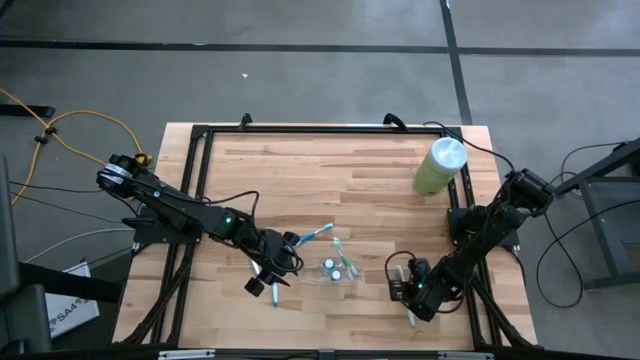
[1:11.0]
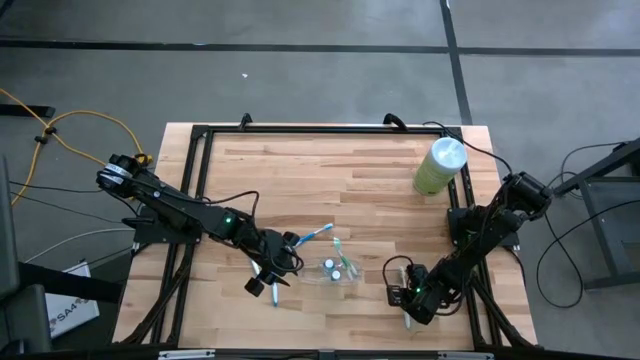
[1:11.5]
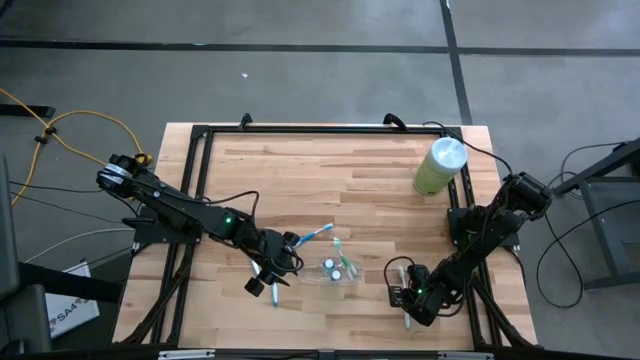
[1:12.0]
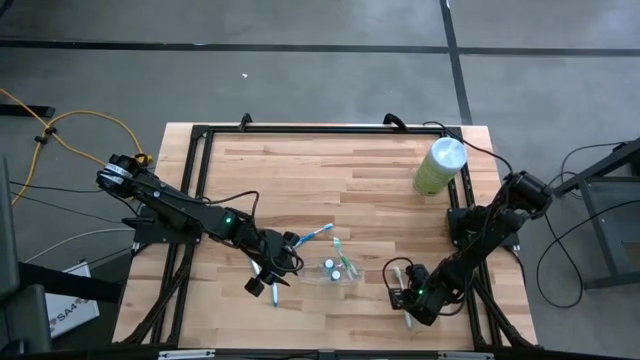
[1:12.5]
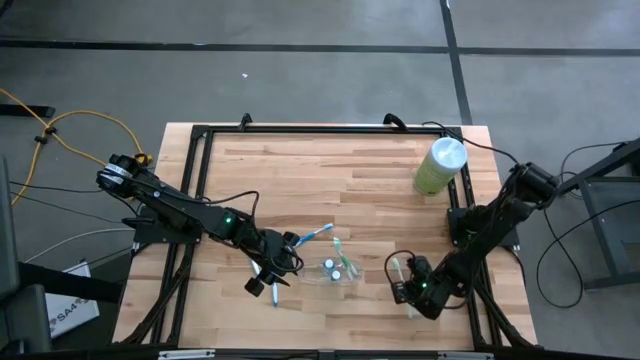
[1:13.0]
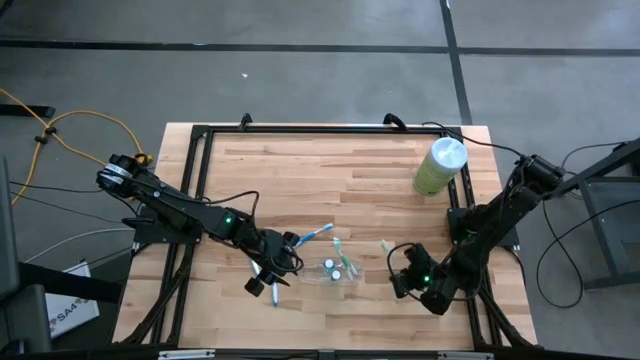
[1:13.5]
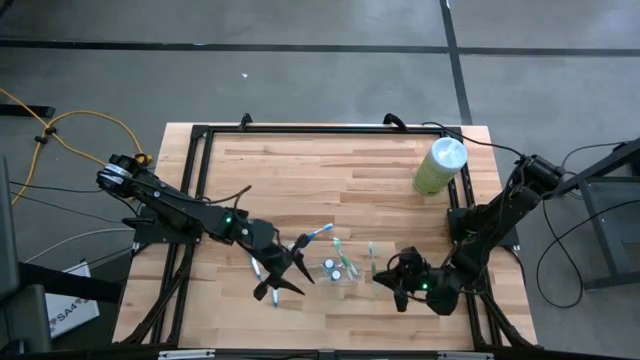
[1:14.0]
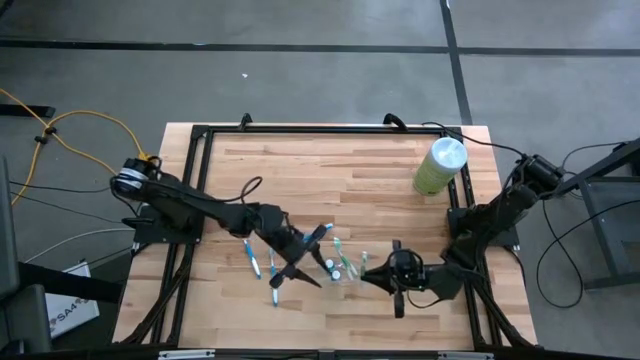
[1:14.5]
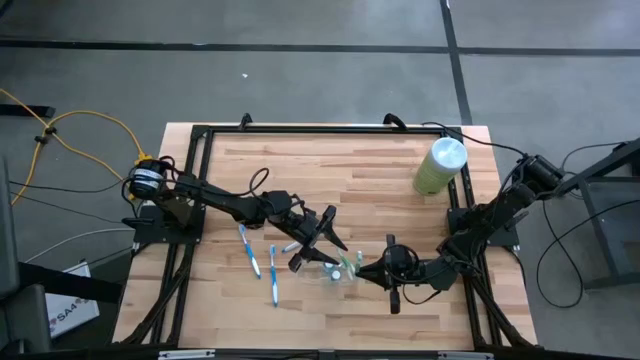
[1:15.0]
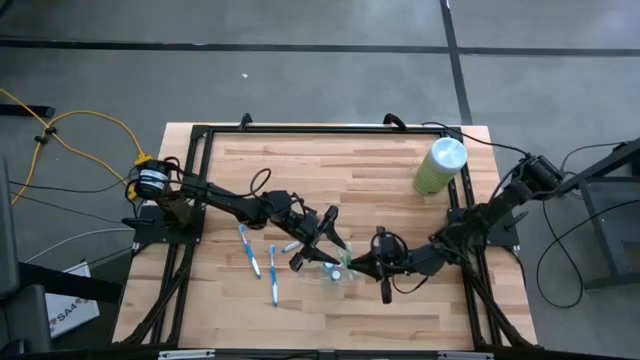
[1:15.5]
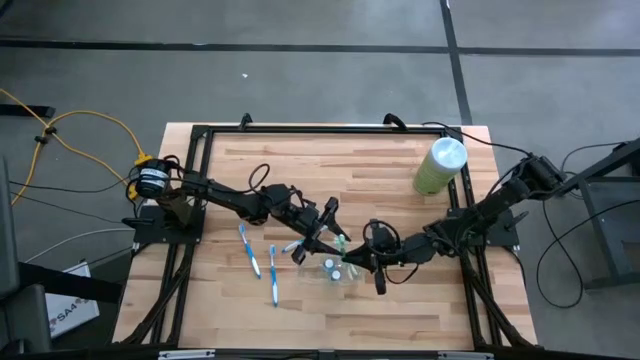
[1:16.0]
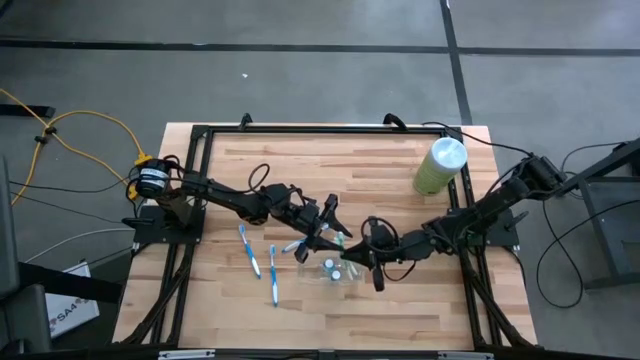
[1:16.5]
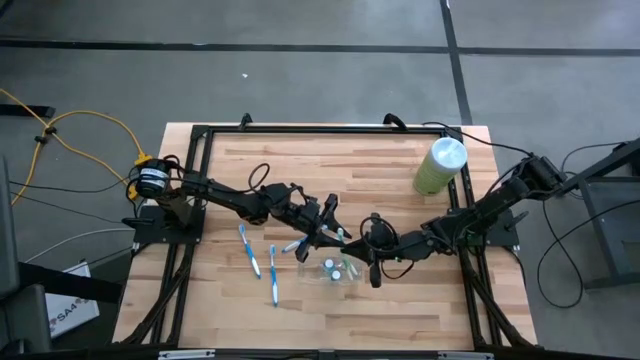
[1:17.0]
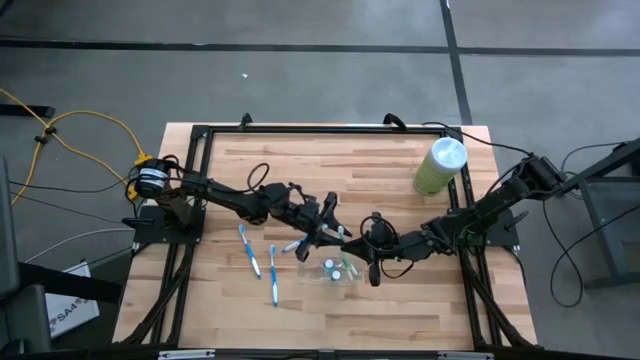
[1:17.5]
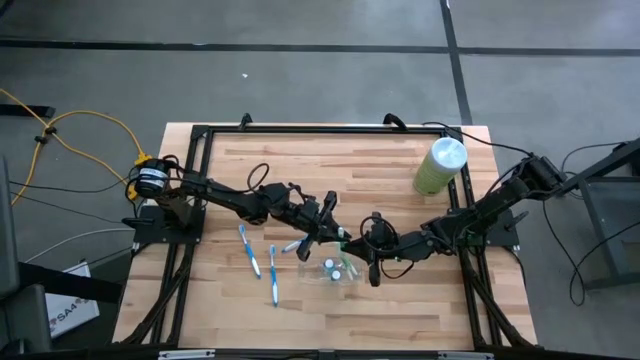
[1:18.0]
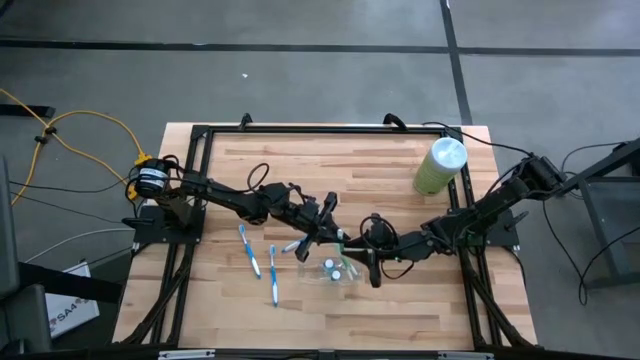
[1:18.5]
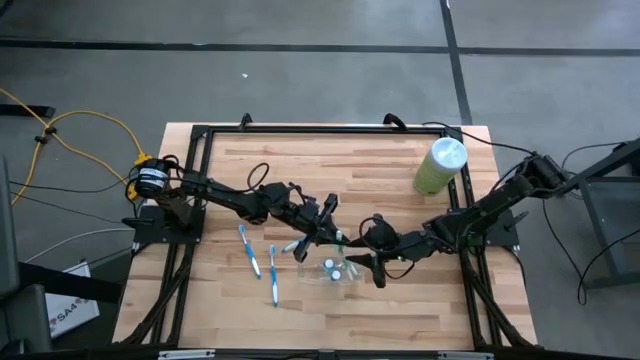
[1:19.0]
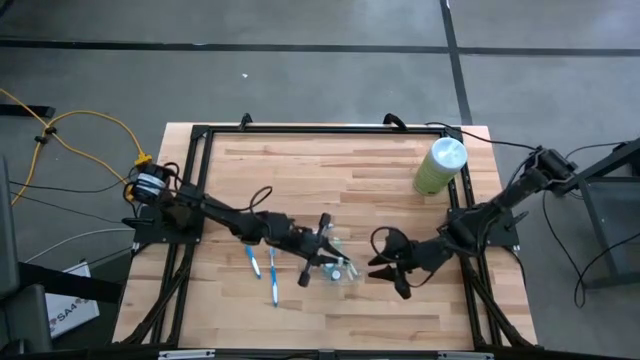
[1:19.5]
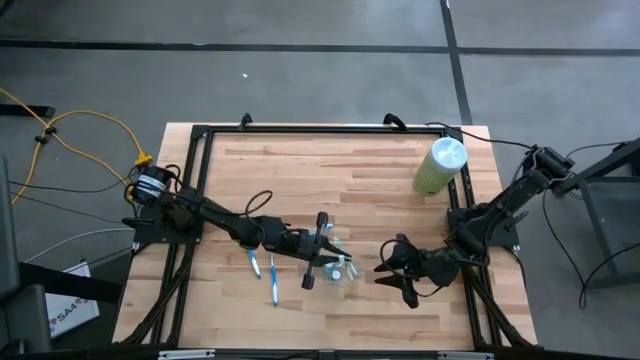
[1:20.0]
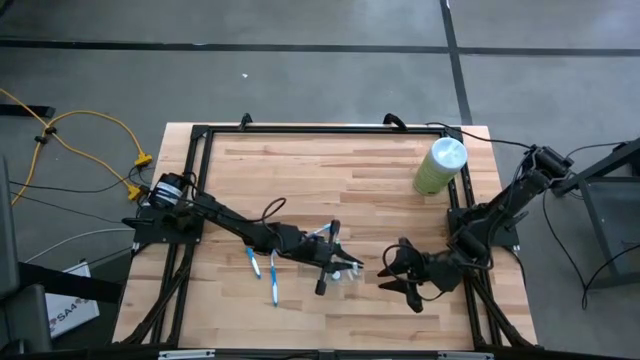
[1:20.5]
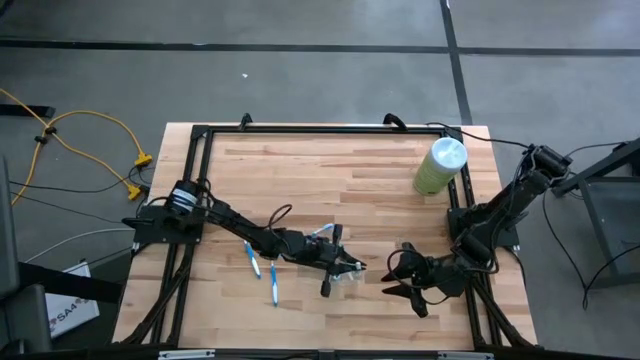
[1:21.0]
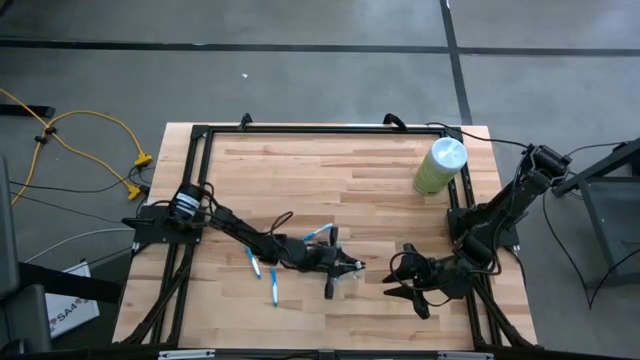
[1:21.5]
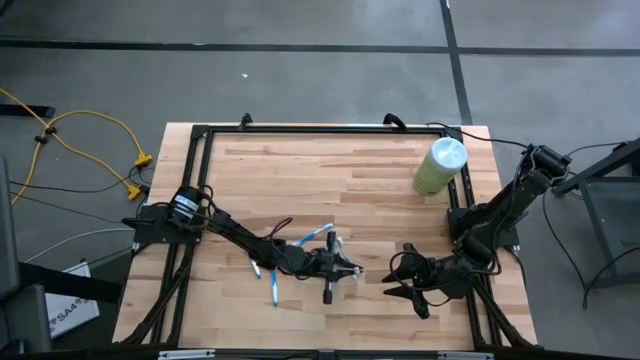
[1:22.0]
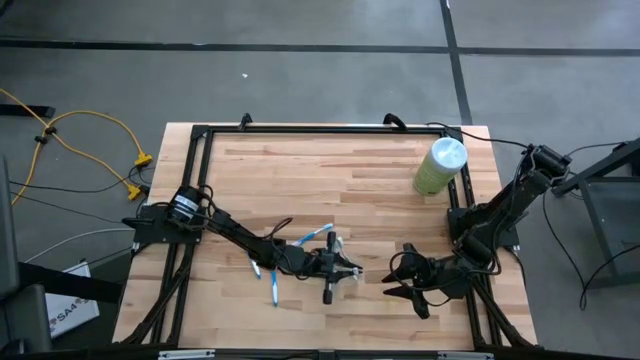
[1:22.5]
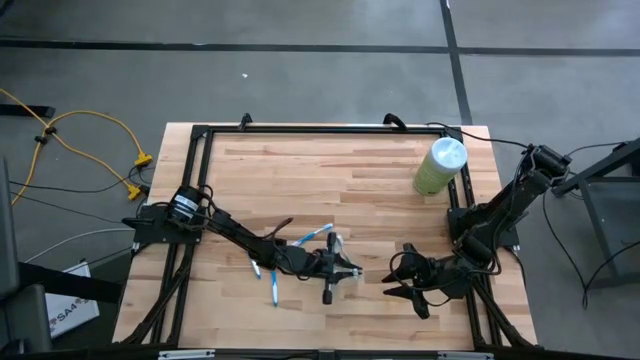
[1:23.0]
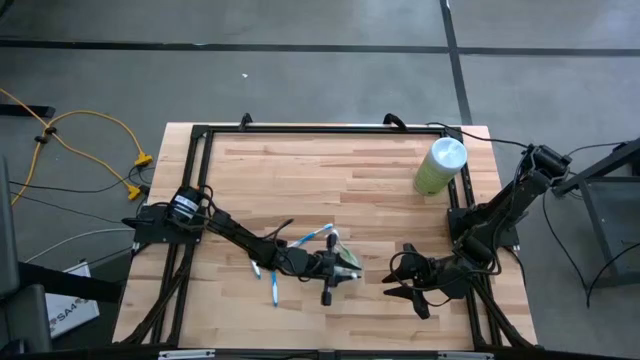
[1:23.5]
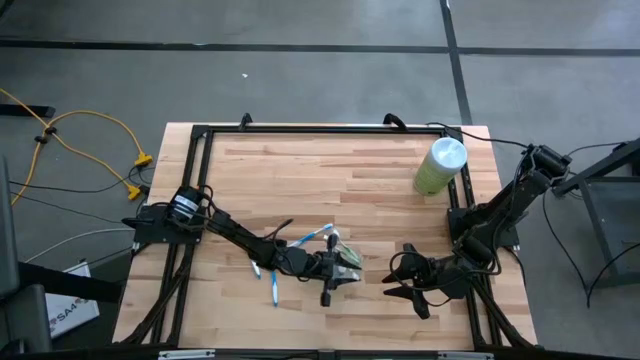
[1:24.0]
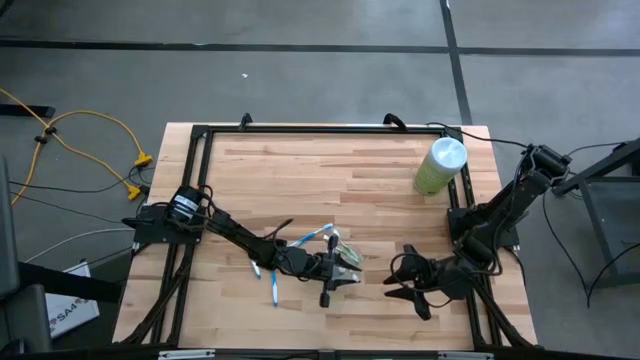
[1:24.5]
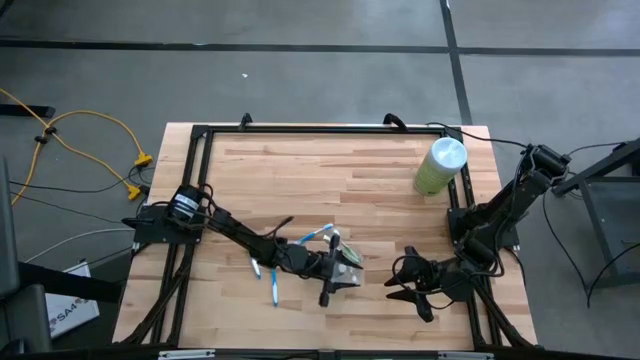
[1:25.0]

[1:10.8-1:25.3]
Task: Pick & Place toothbrushing station
Put the green toothbrush into the transparent organizer
